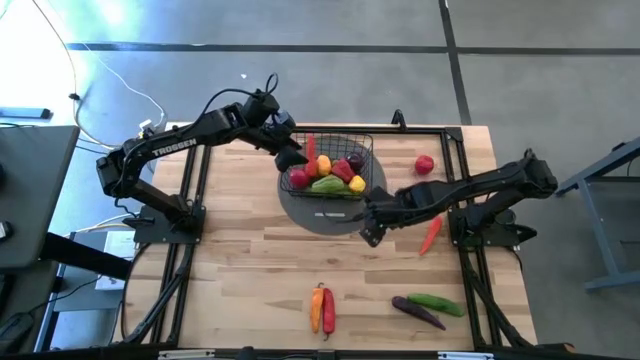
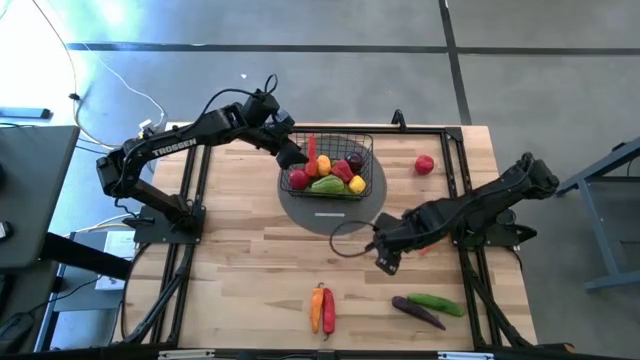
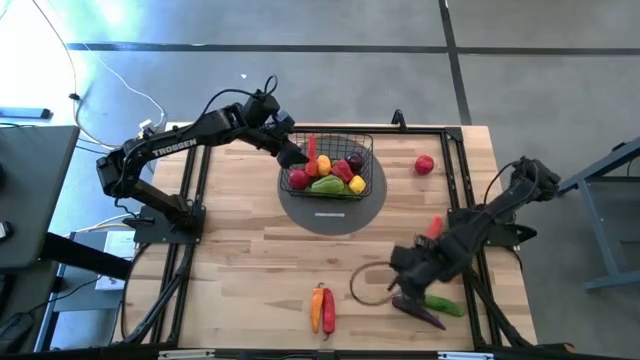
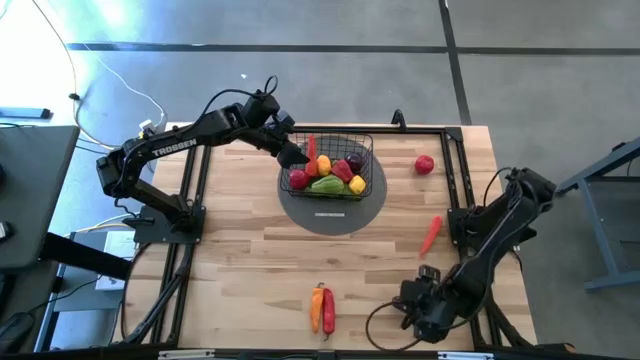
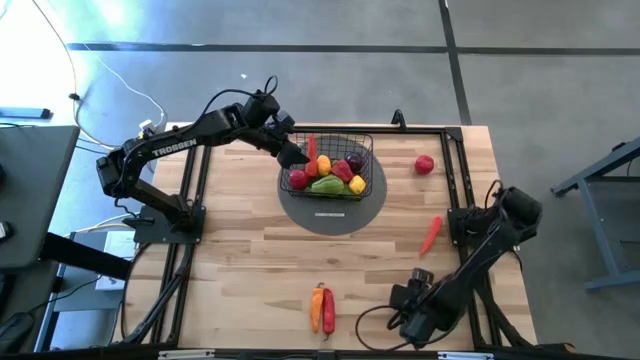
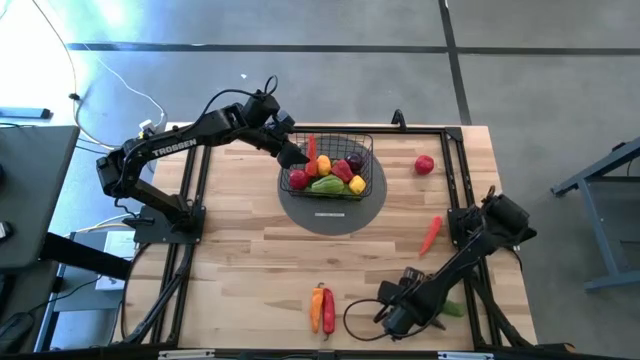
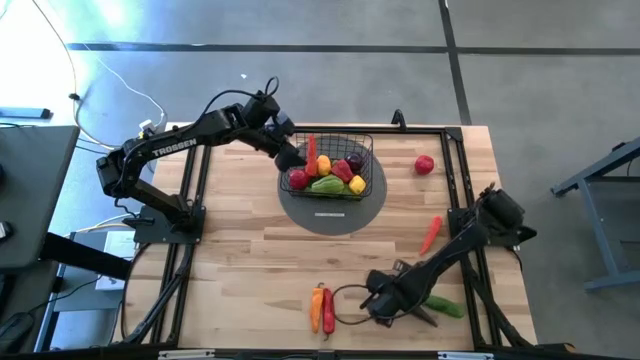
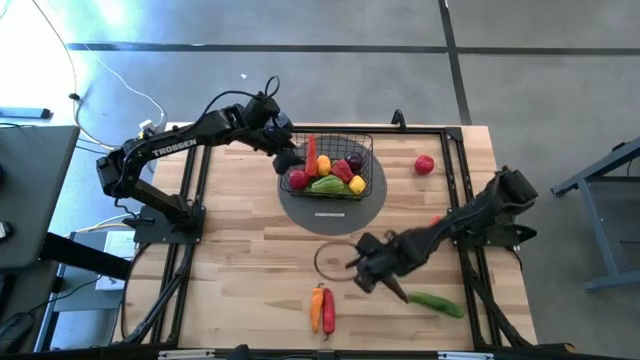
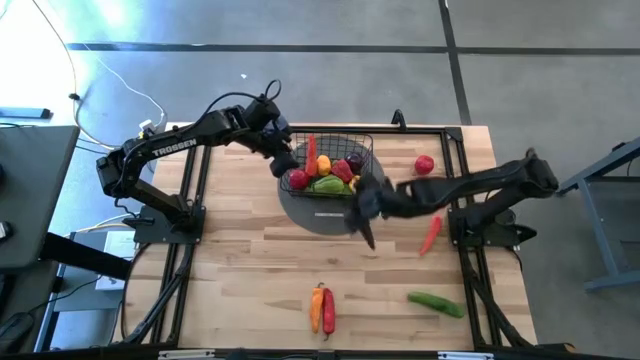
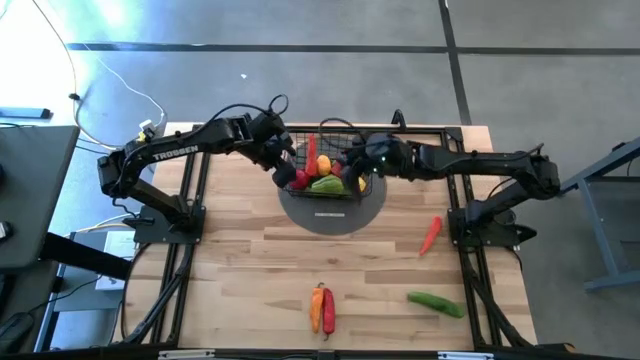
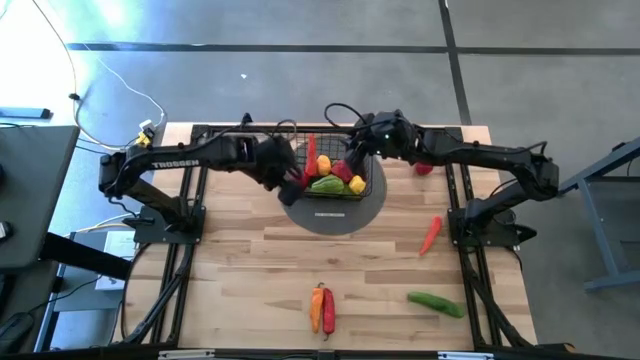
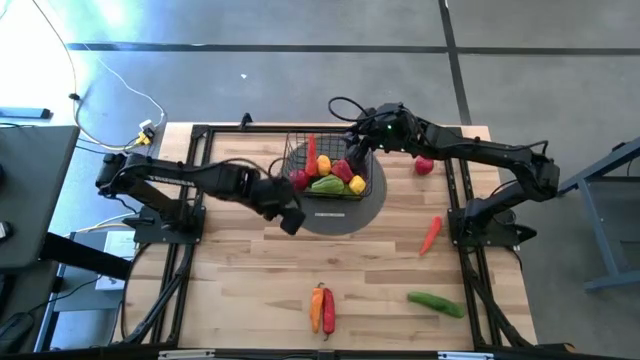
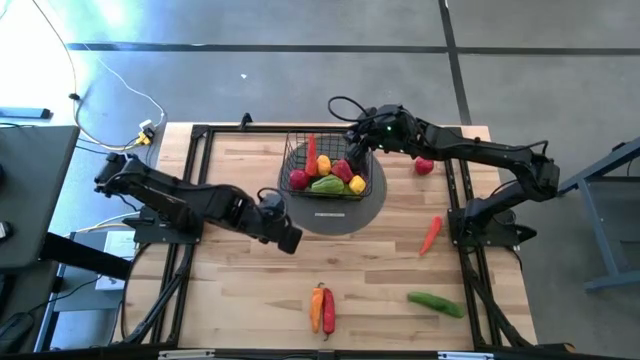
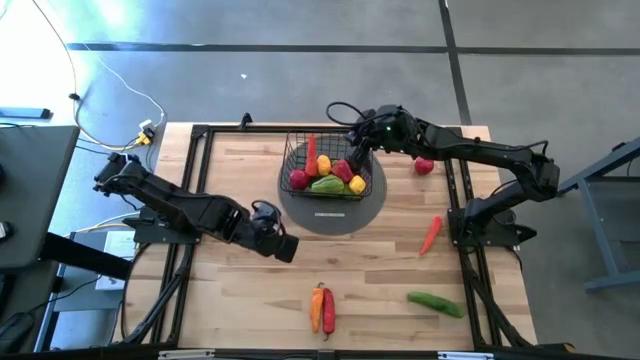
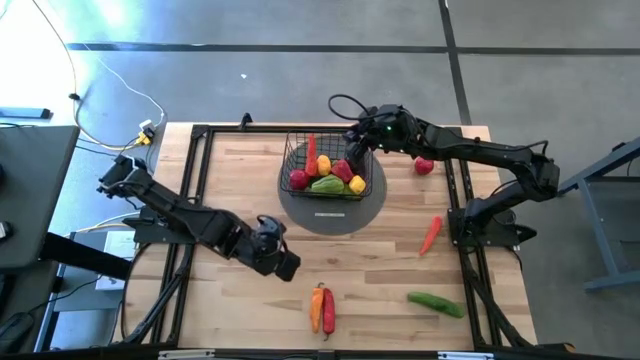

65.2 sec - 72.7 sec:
Task: Build produce basket
Put the eggplant into the wire basket

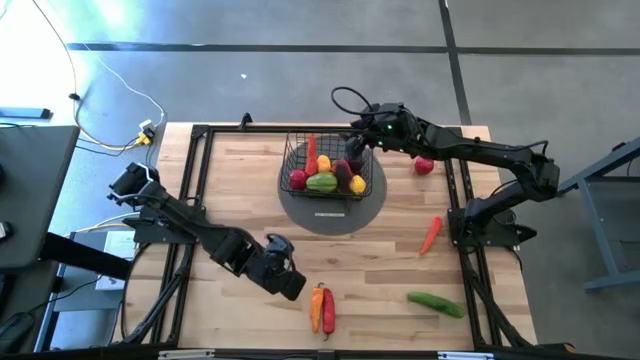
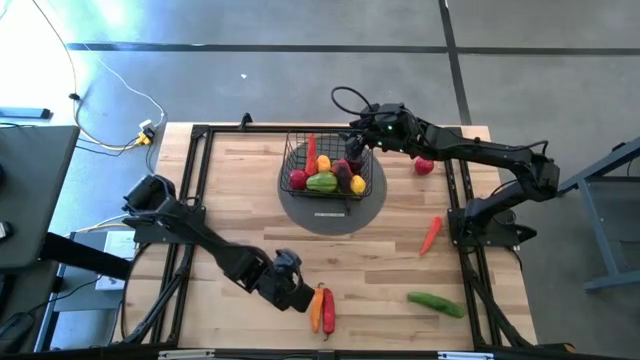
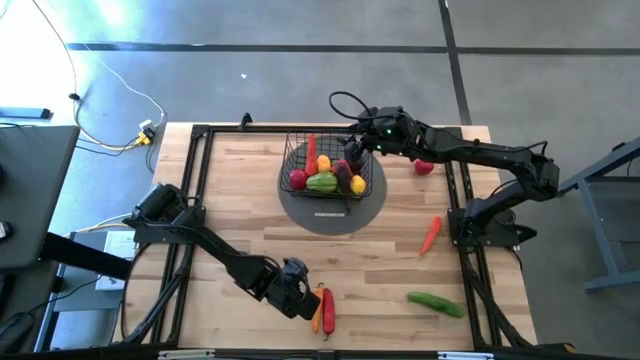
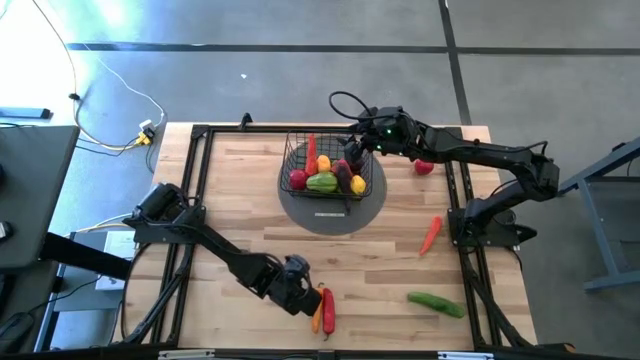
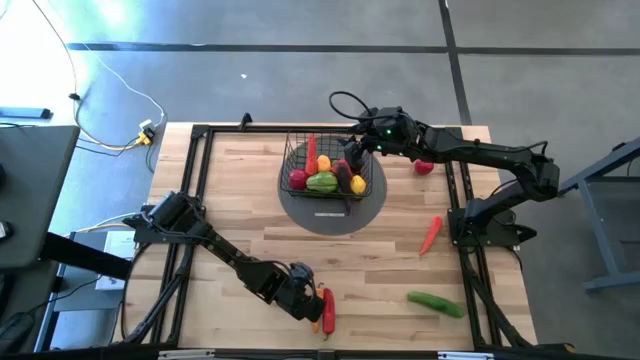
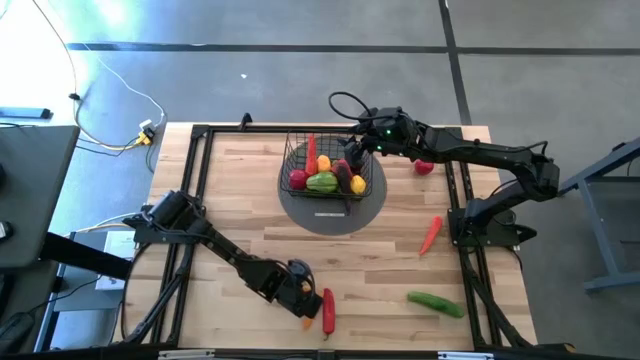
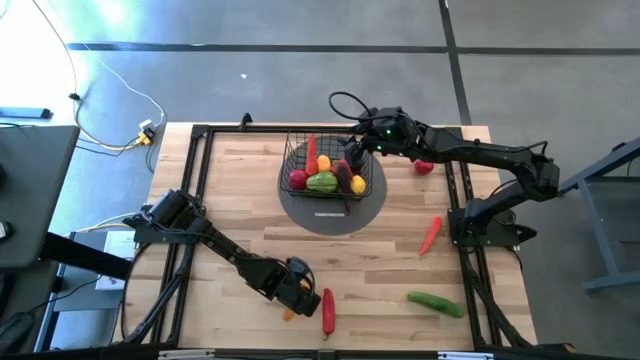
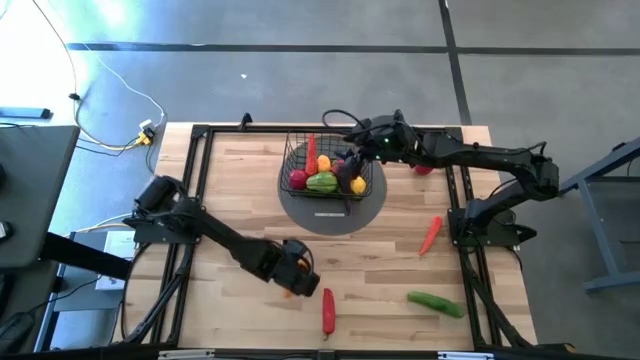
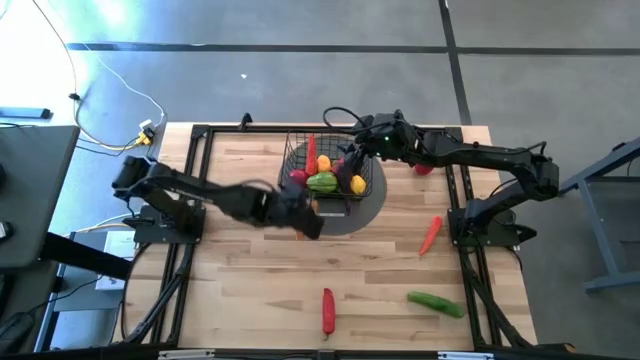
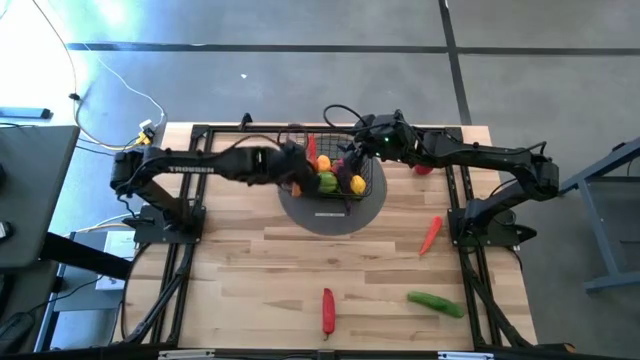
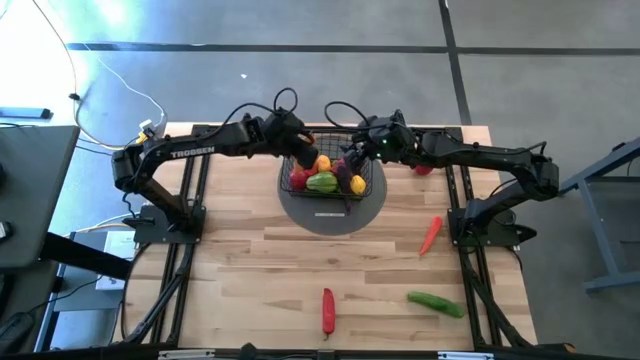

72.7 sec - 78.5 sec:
Put the yellow pepper into the wire basket

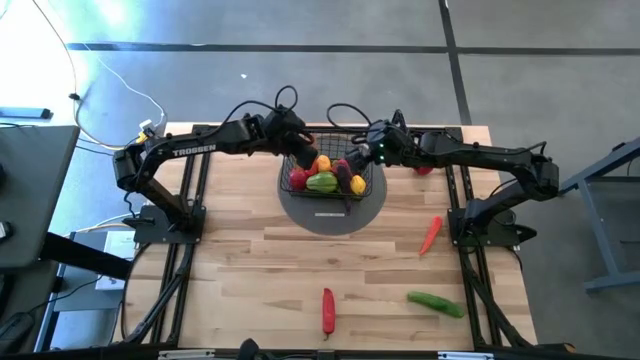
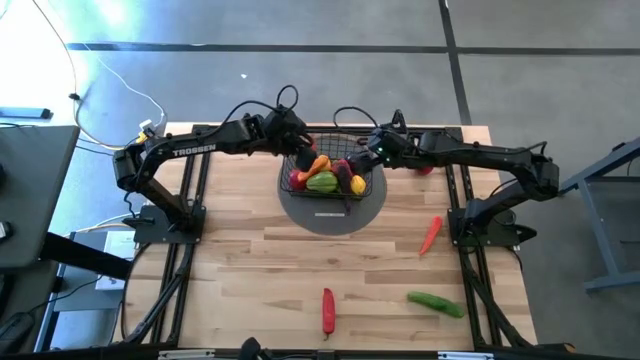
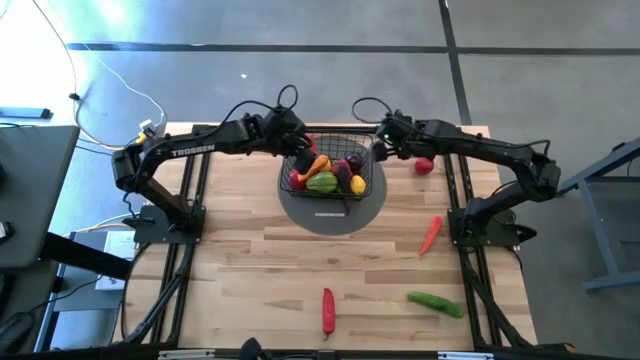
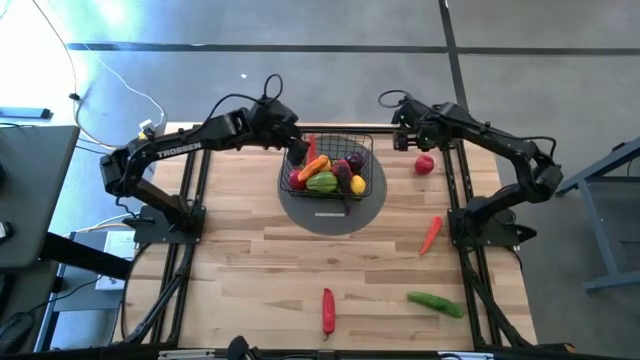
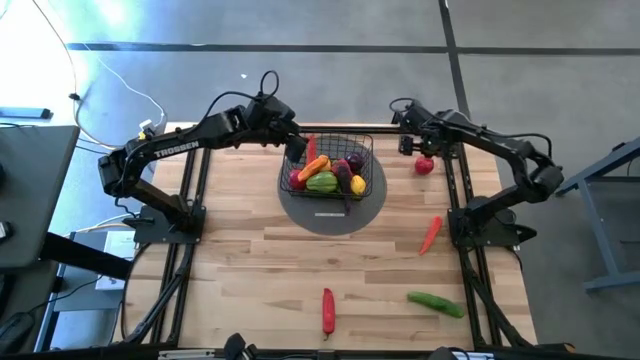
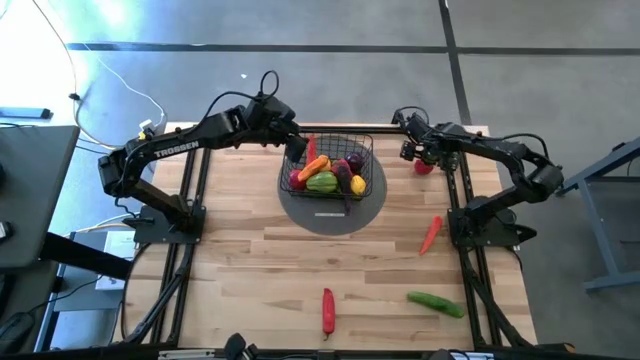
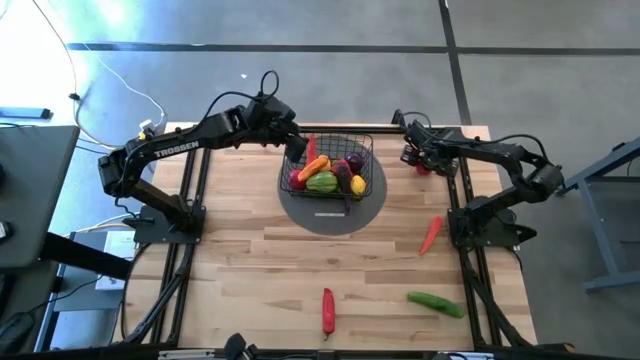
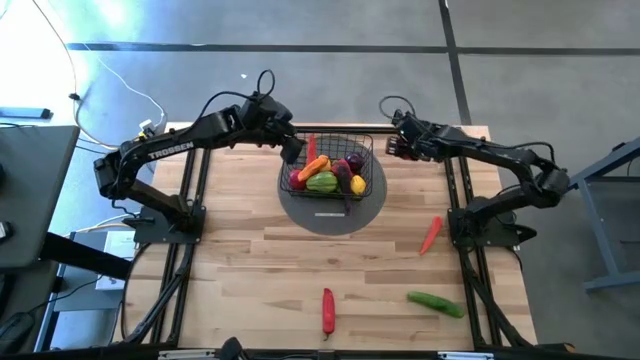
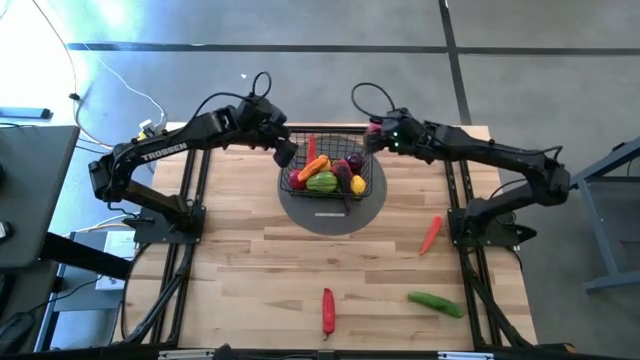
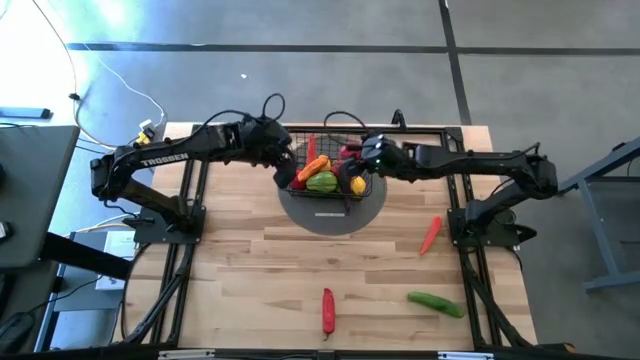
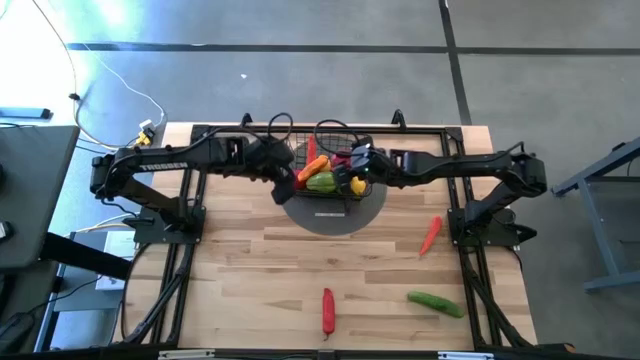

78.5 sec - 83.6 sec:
Put the right tomato into the wire basket

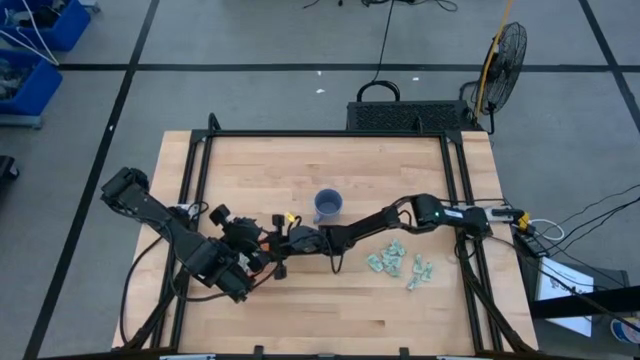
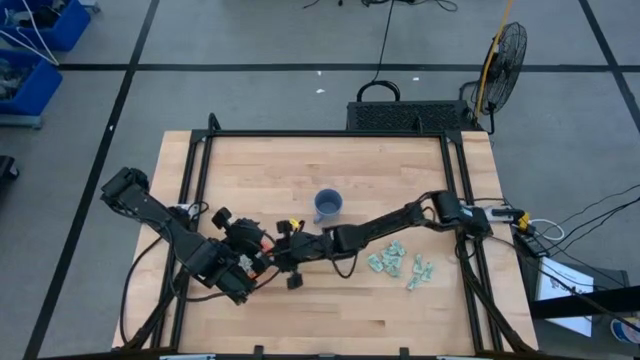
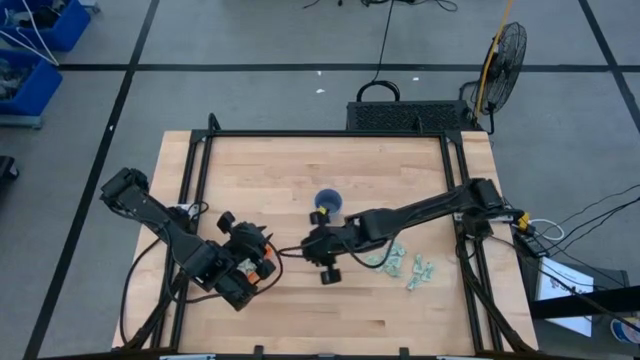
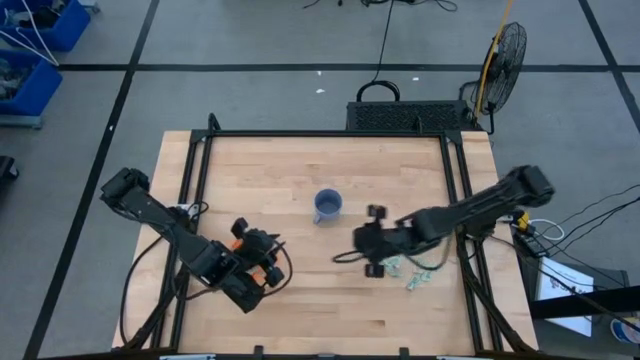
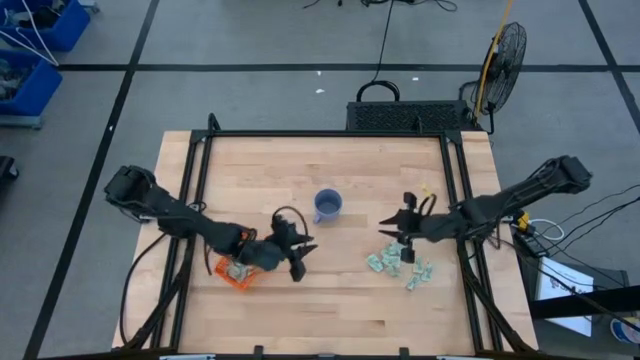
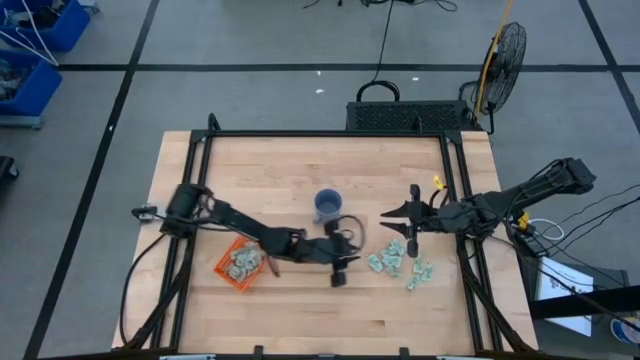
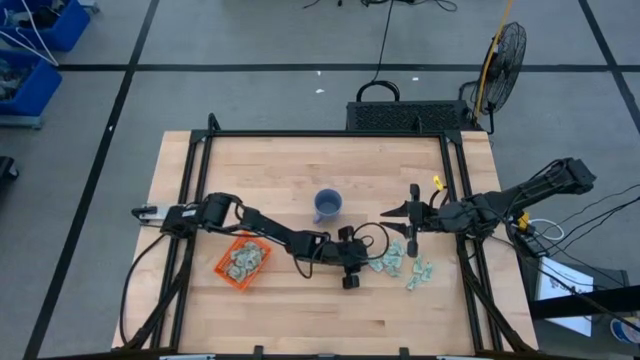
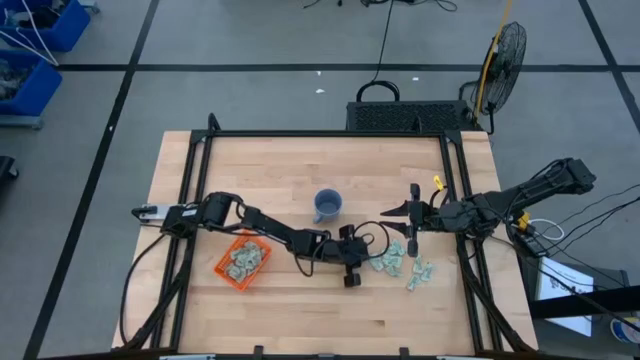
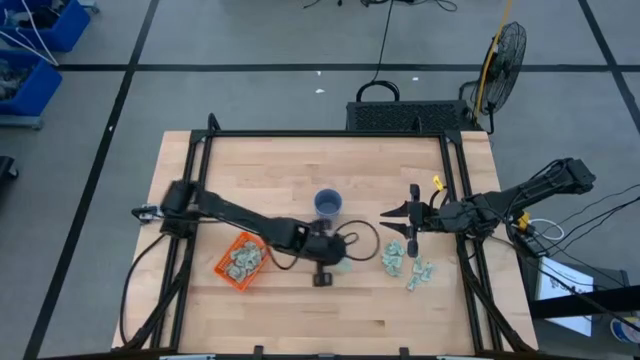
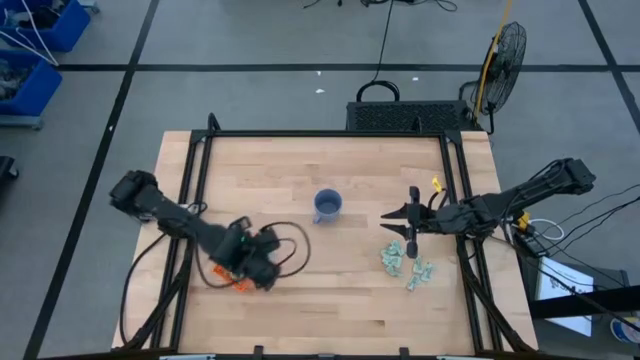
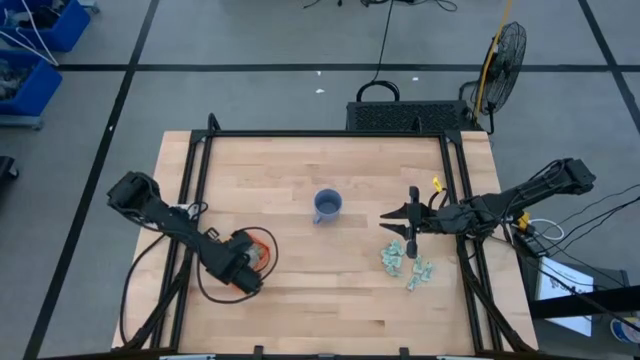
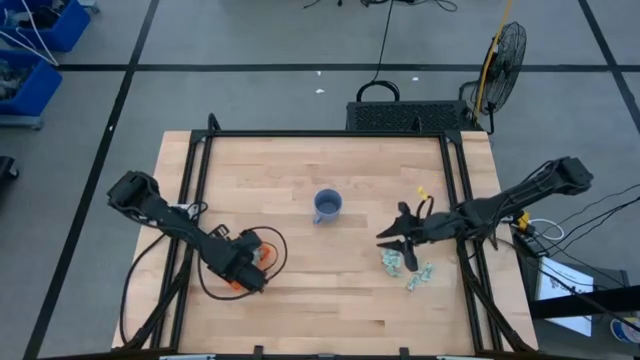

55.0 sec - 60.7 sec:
Task: Pick and place Stevia / Truvia into bins
Put the green stevia packet into the orange basket
